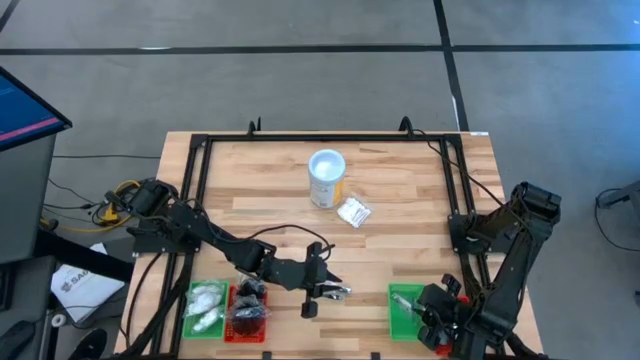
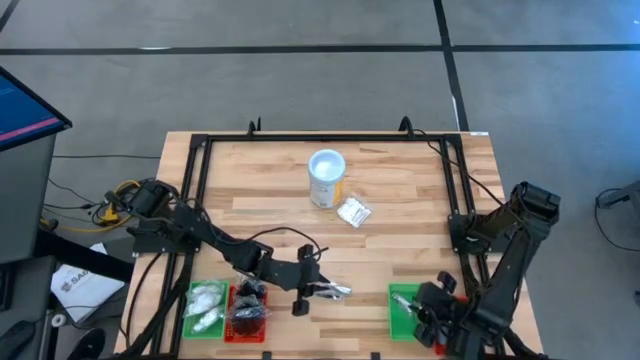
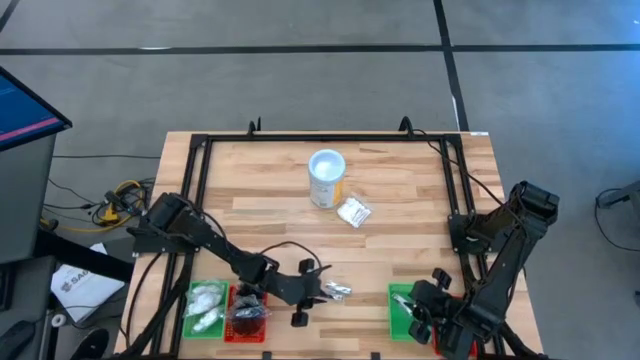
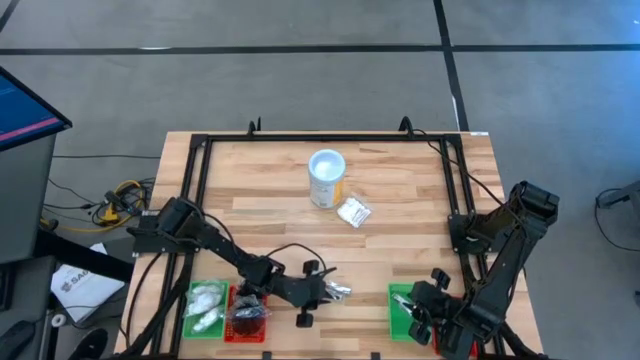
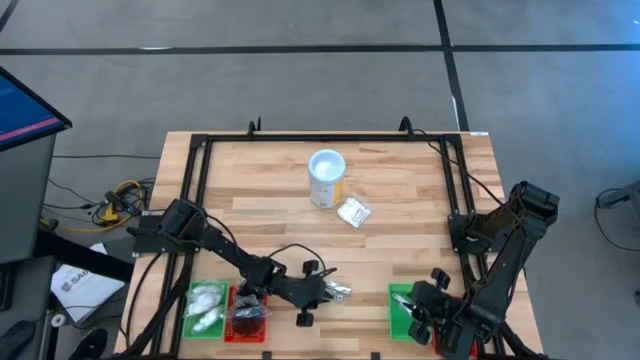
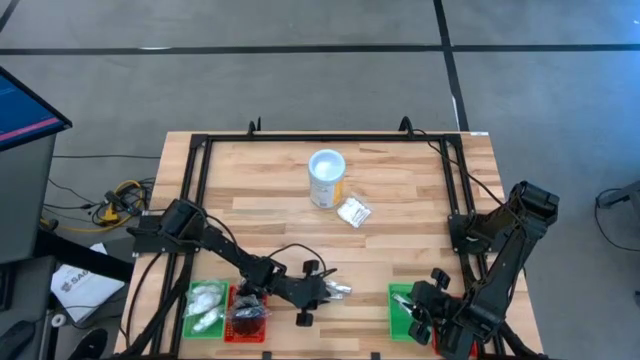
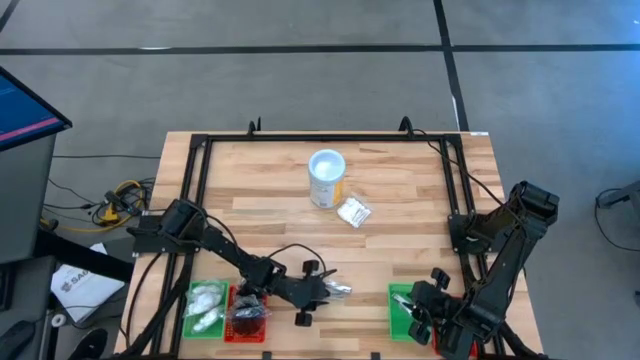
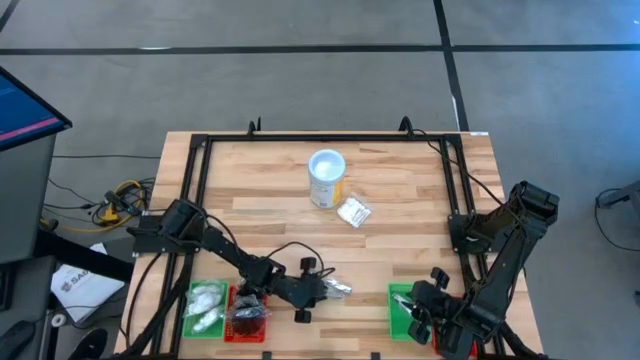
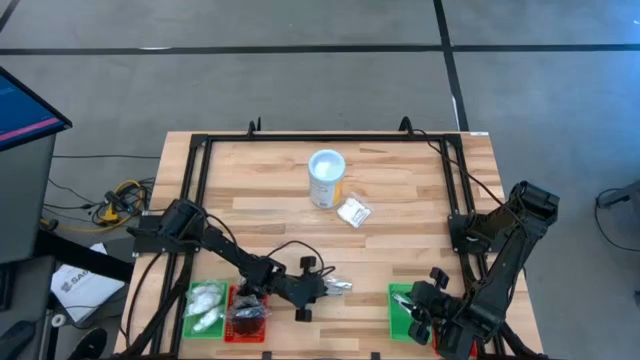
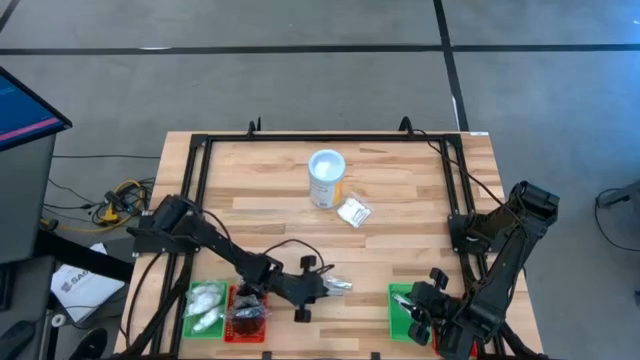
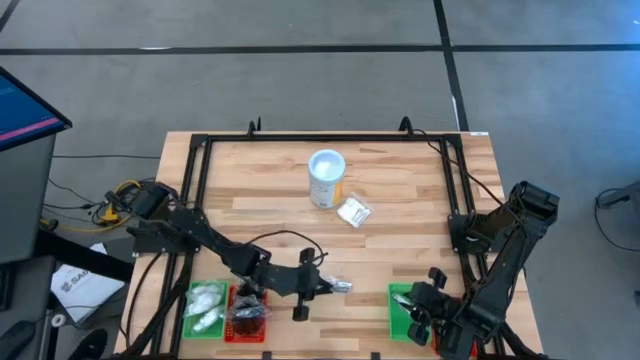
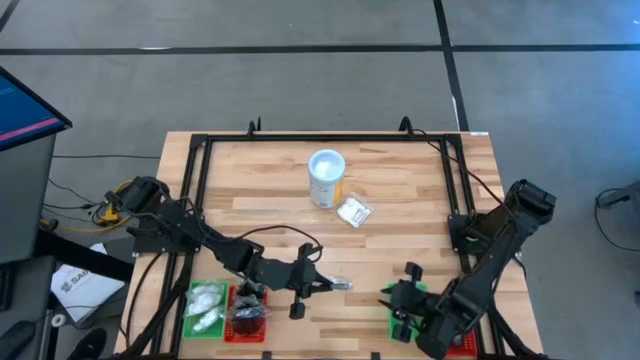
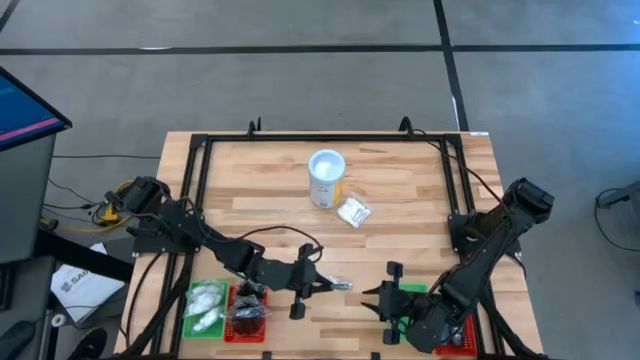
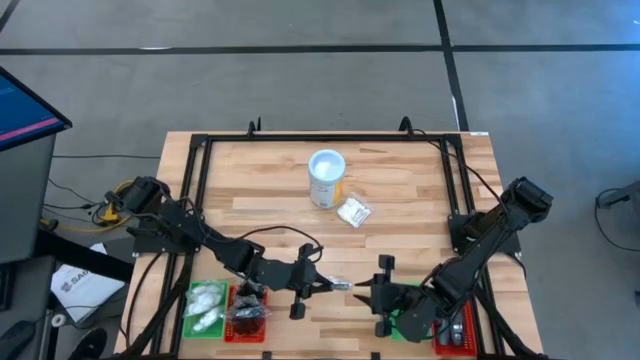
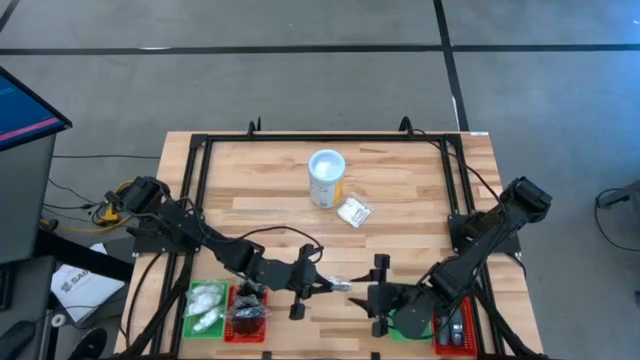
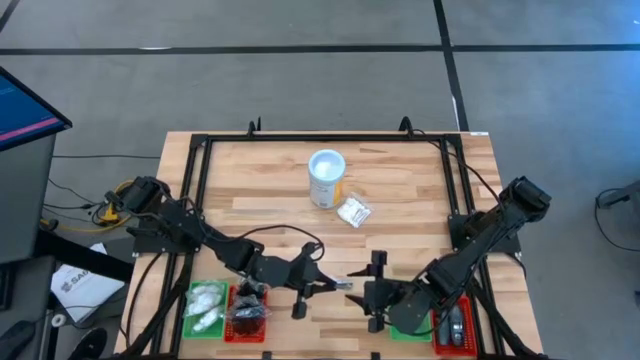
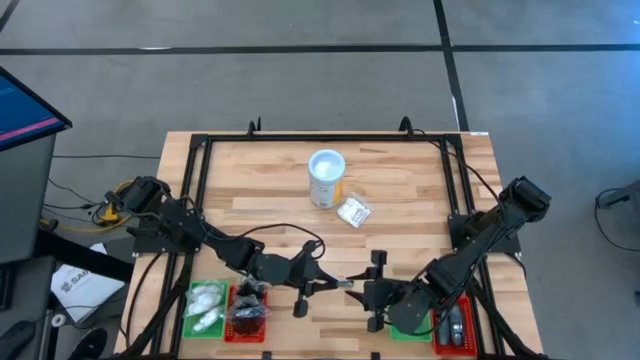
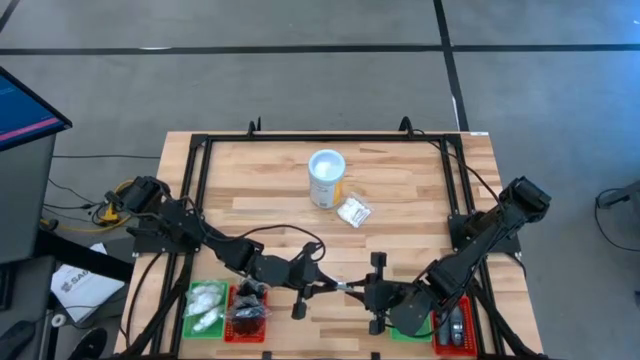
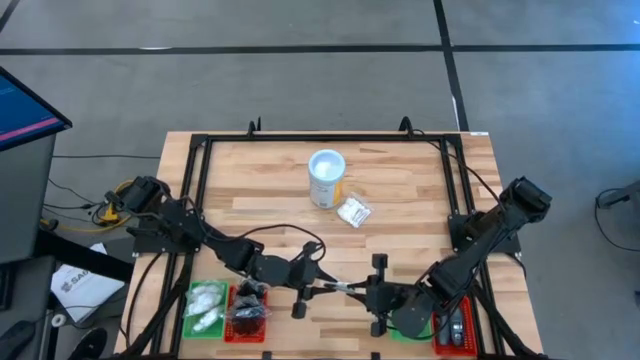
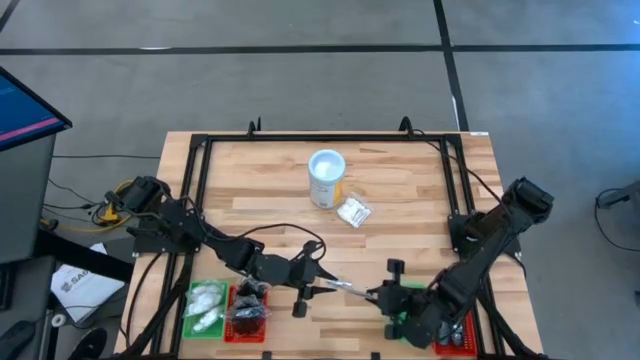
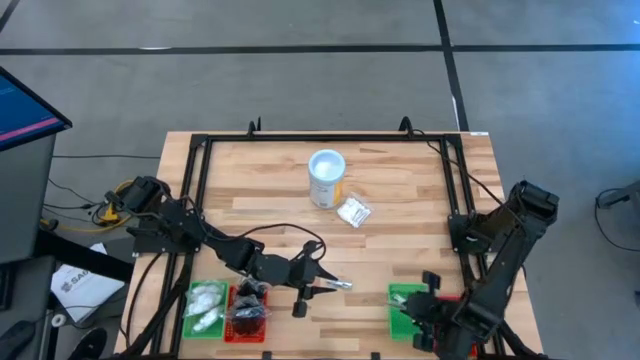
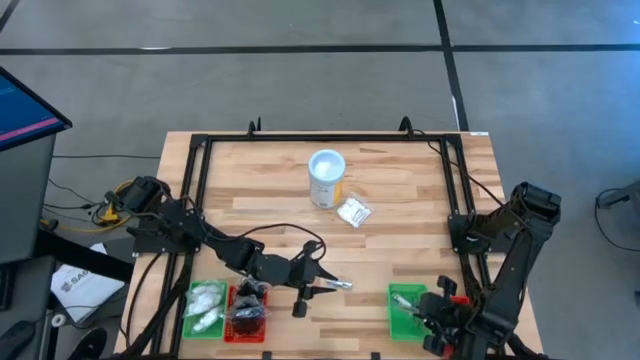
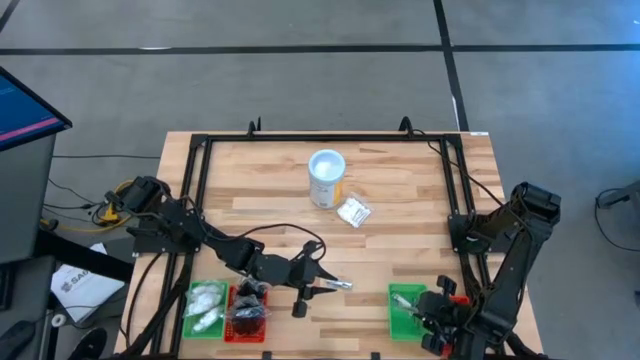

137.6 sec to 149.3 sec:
Task: Pick & Place Travel size toiletries
Put the nail cutter into the right green bin

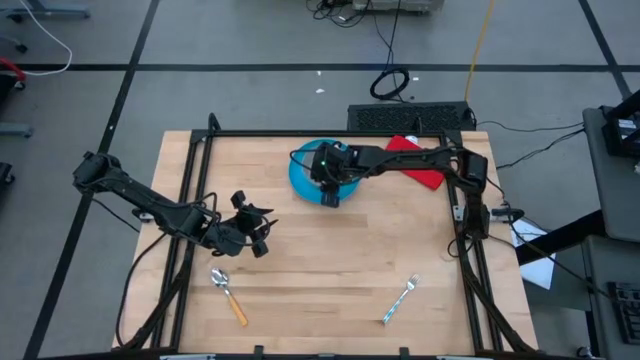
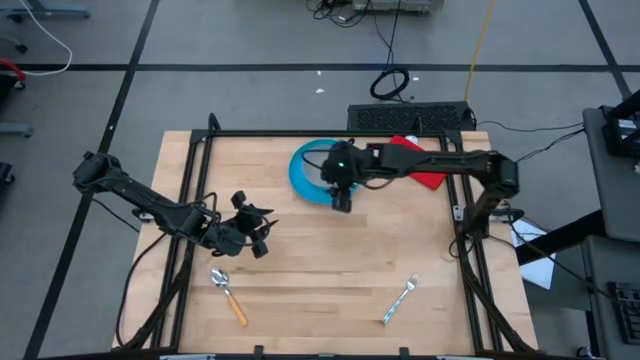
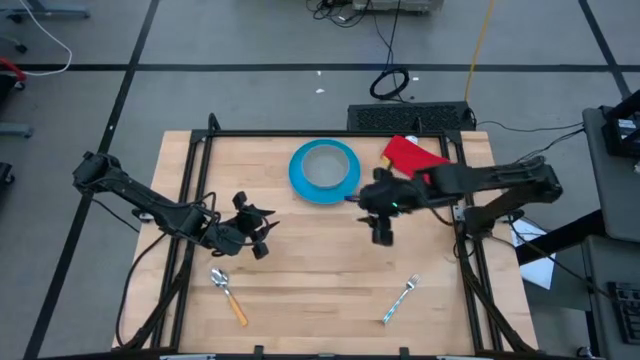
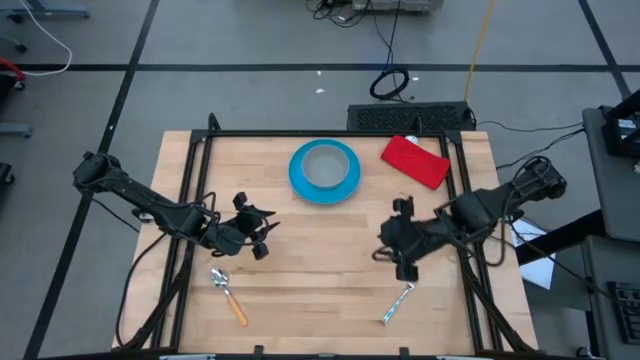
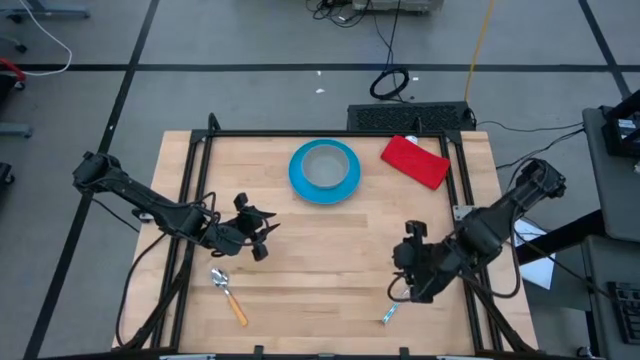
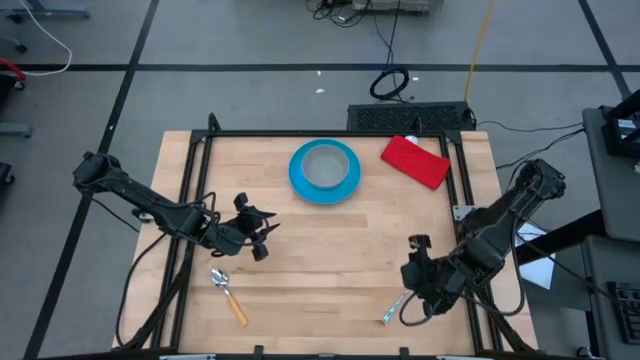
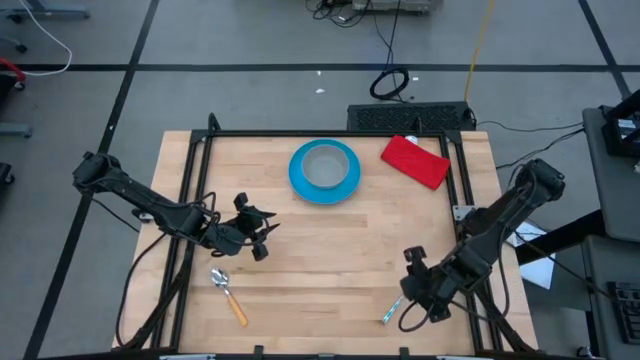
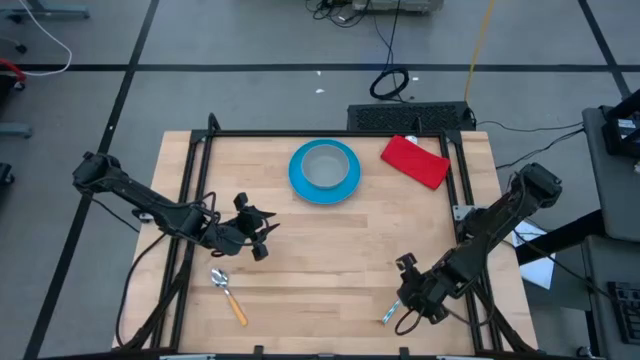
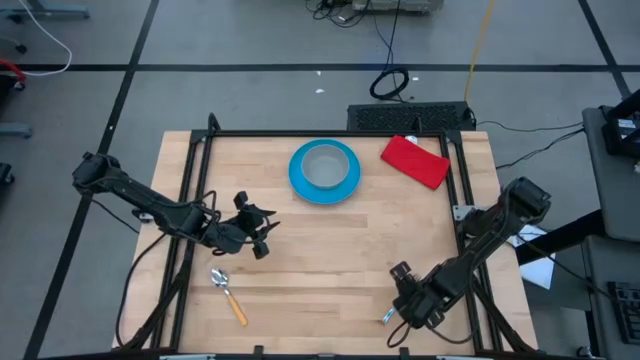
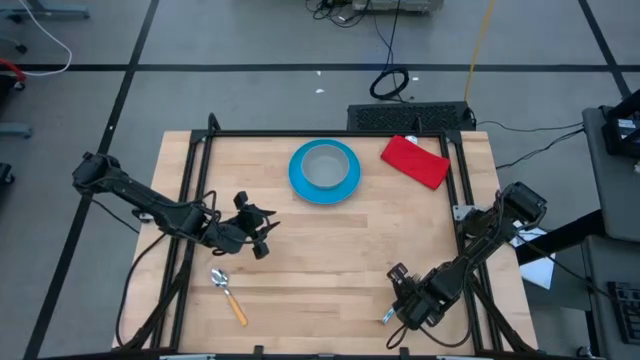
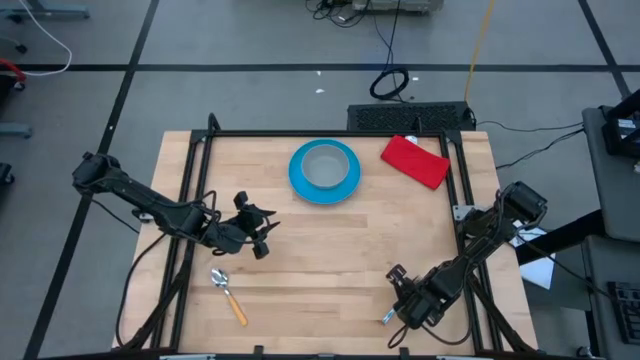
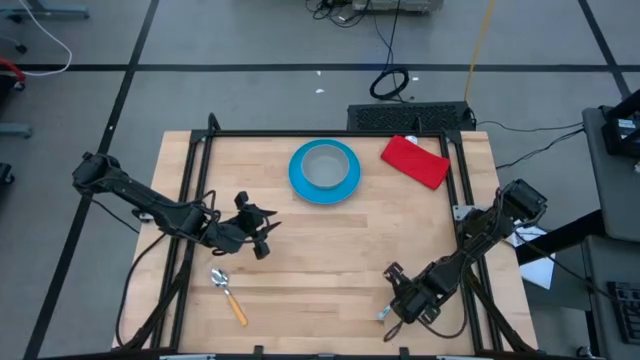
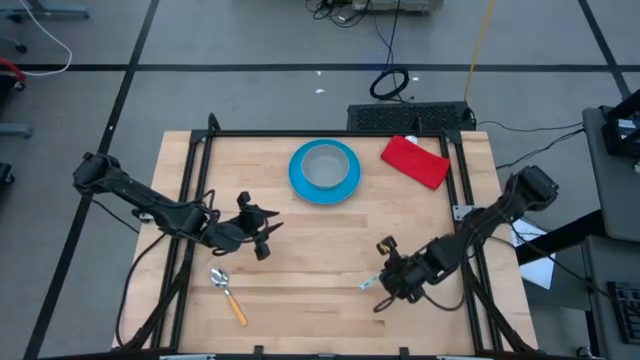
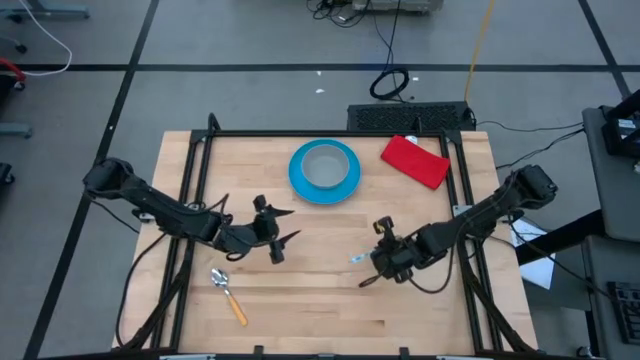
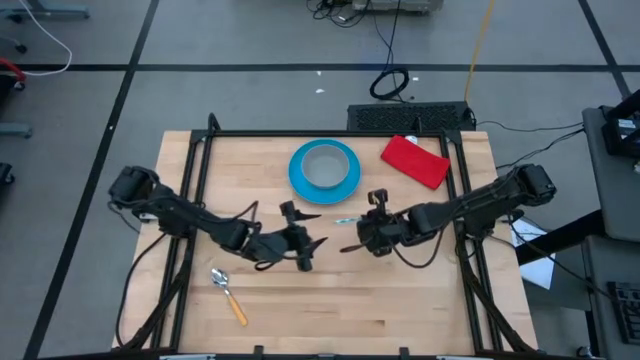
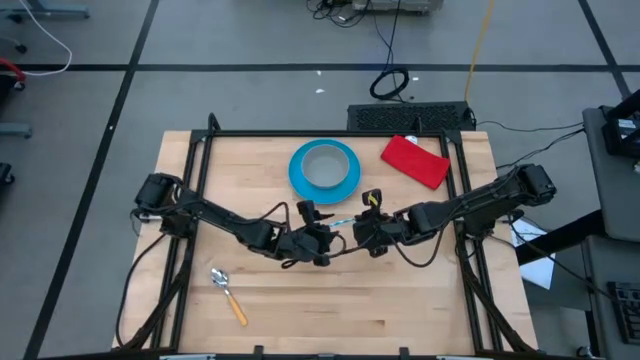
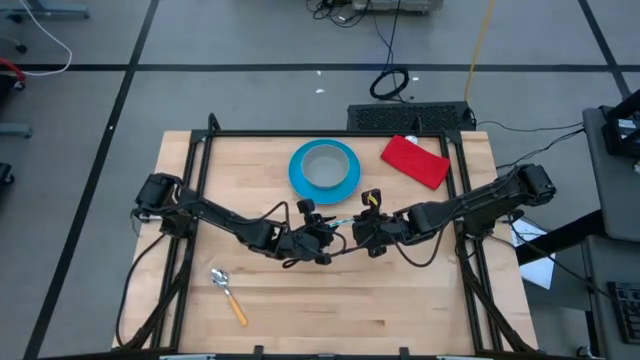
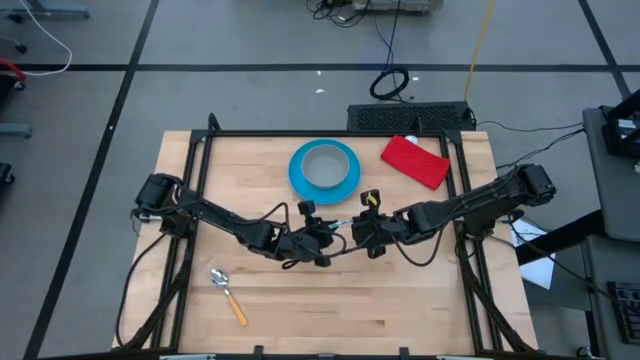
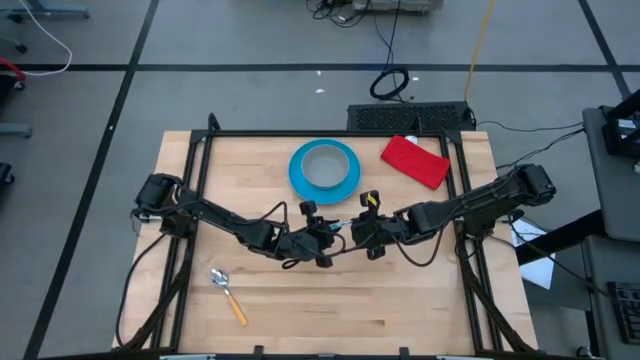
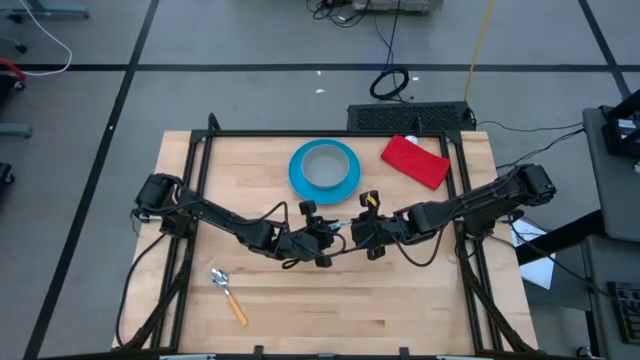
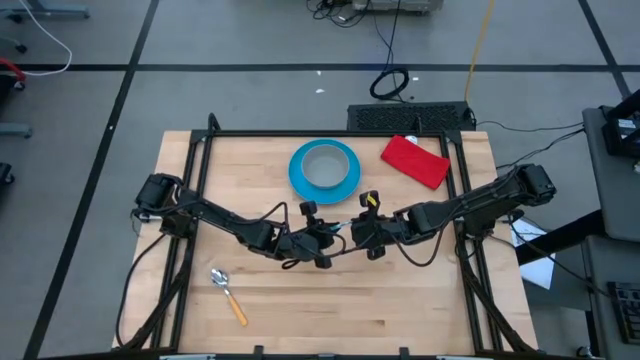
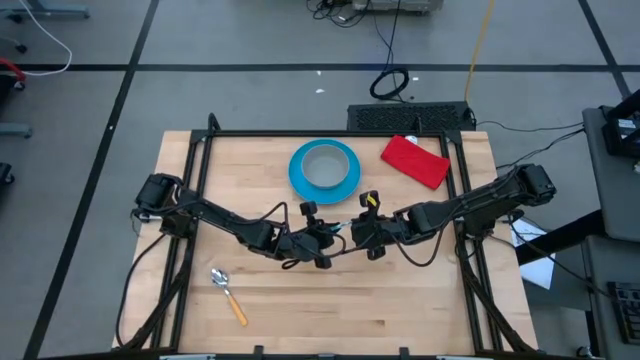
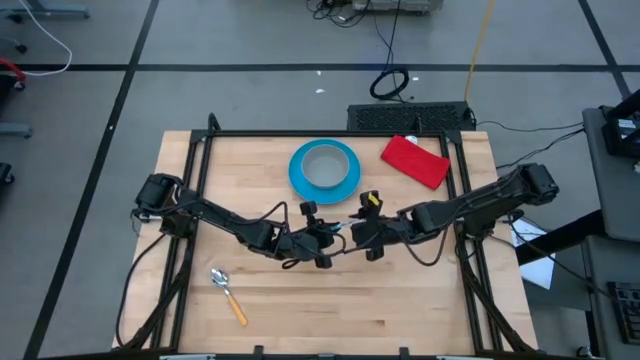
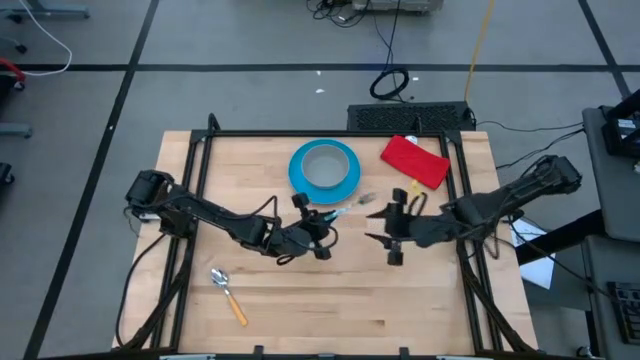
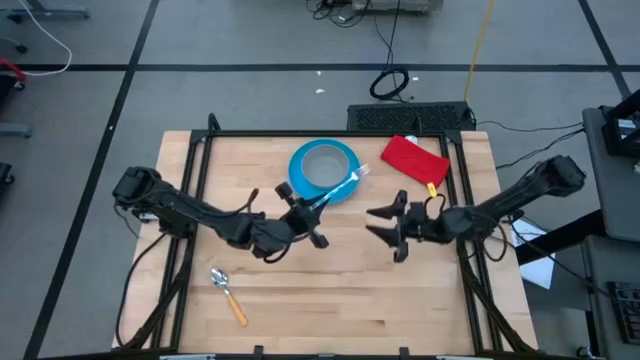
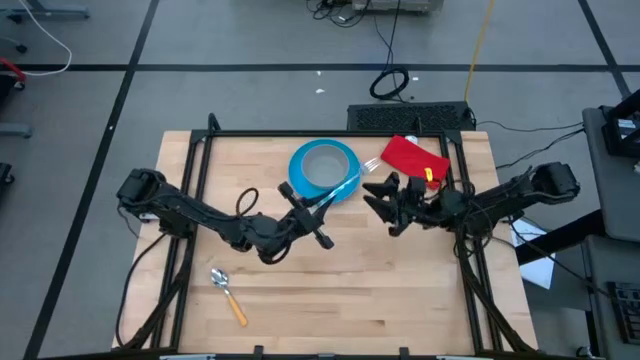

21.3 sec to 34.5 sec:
Task: Pick and place plate/cup/fork/spoon on tray
Put the blue patterned fork beside the blue plate
